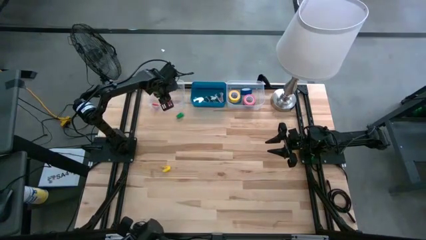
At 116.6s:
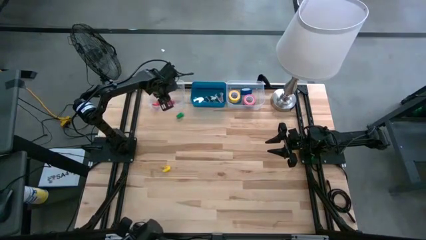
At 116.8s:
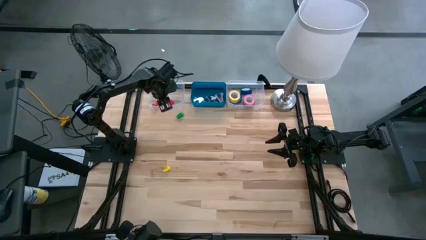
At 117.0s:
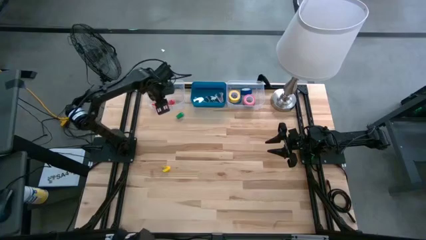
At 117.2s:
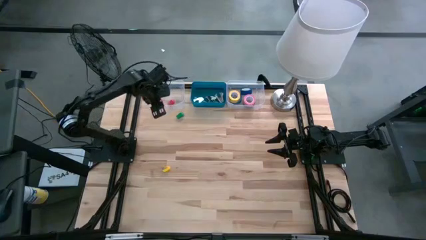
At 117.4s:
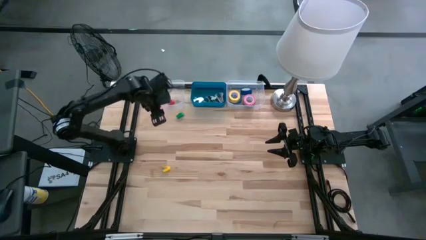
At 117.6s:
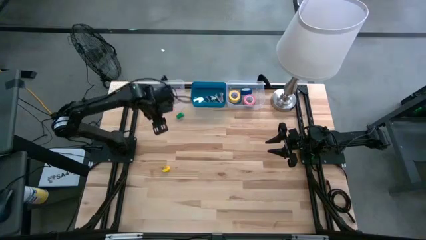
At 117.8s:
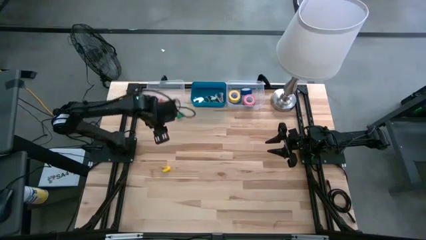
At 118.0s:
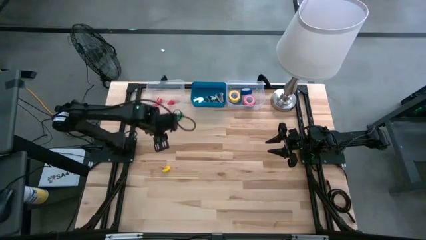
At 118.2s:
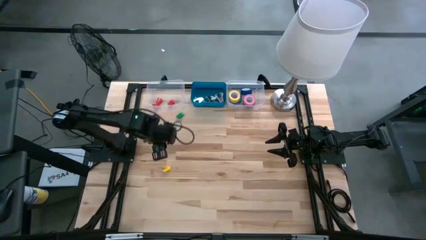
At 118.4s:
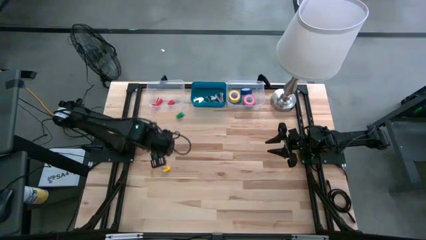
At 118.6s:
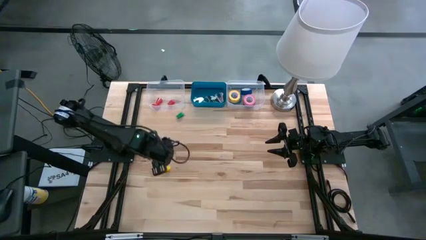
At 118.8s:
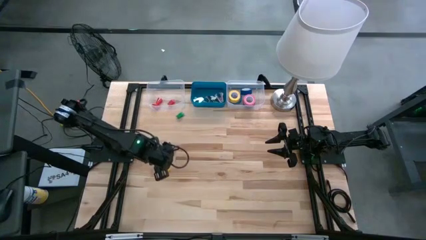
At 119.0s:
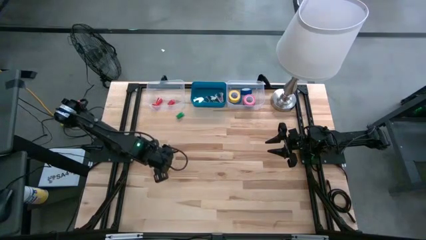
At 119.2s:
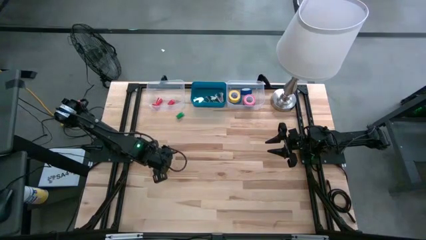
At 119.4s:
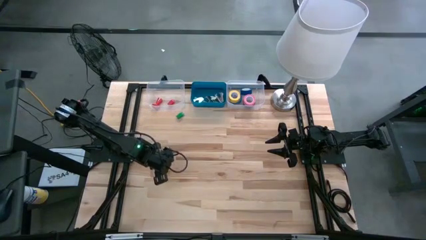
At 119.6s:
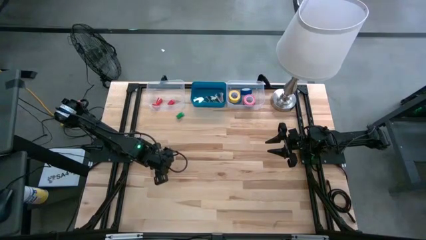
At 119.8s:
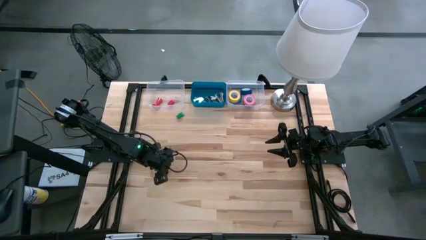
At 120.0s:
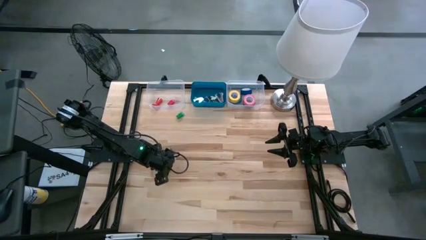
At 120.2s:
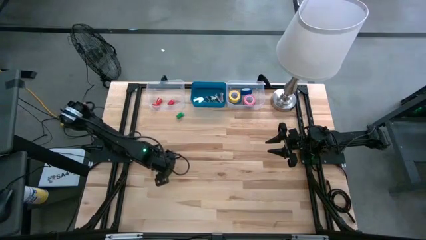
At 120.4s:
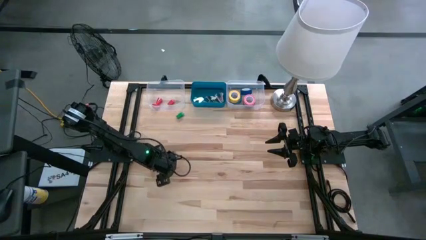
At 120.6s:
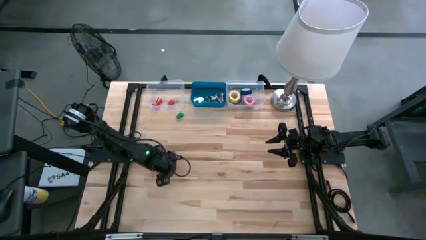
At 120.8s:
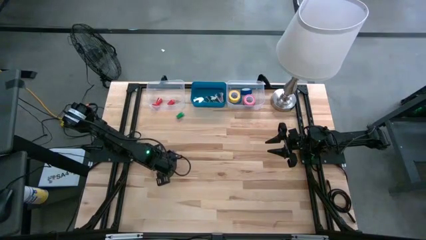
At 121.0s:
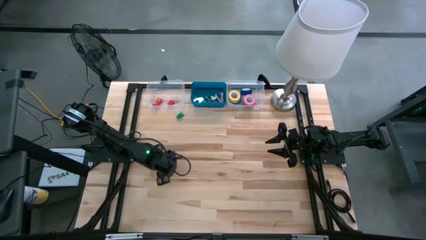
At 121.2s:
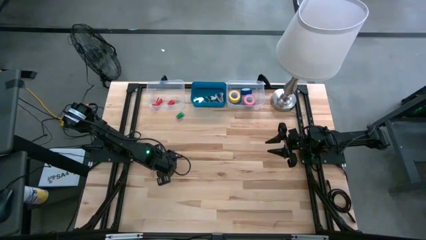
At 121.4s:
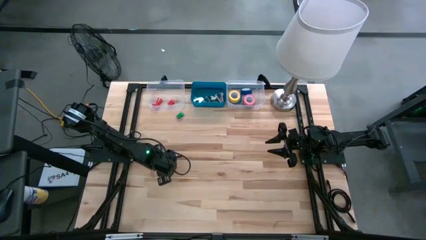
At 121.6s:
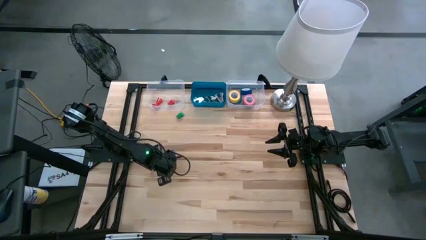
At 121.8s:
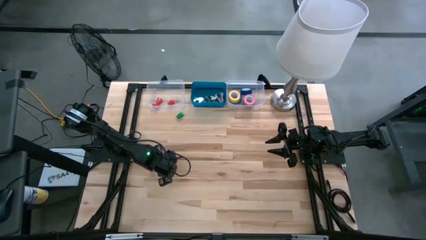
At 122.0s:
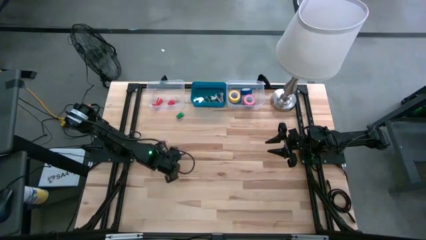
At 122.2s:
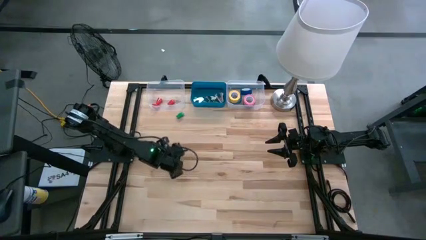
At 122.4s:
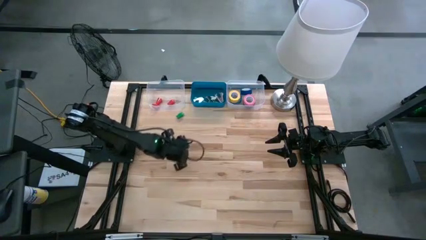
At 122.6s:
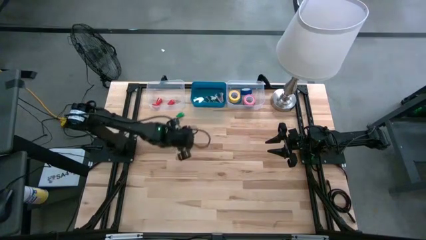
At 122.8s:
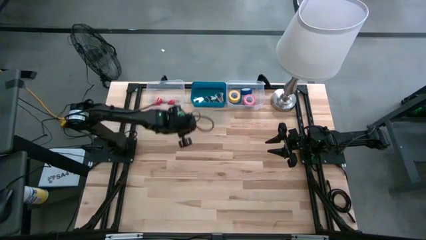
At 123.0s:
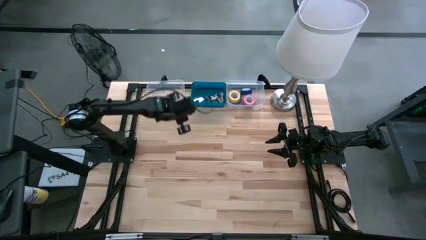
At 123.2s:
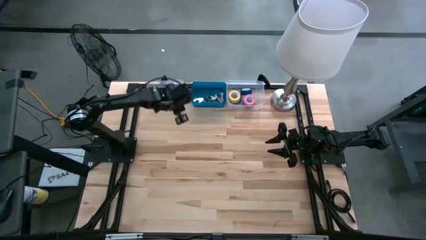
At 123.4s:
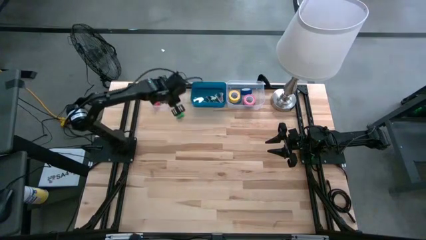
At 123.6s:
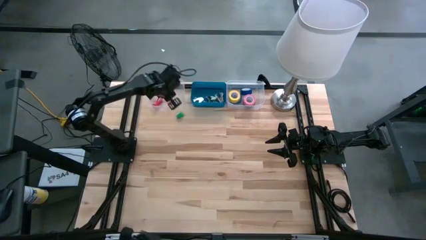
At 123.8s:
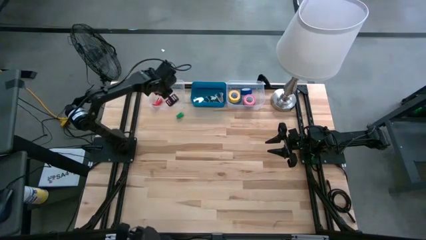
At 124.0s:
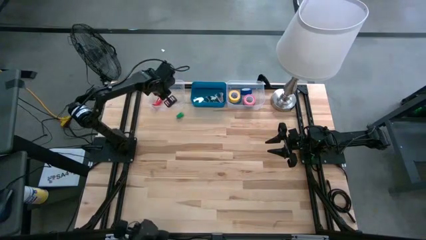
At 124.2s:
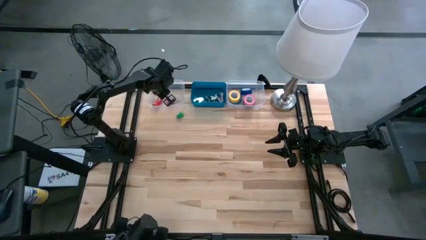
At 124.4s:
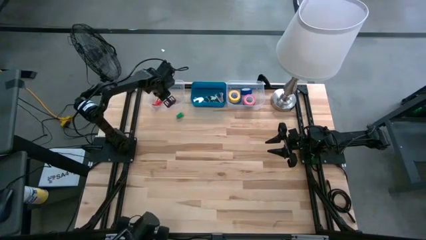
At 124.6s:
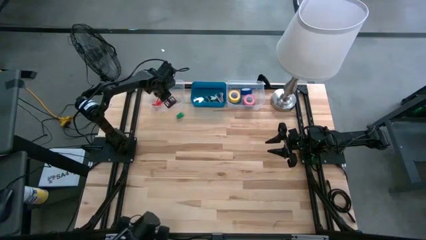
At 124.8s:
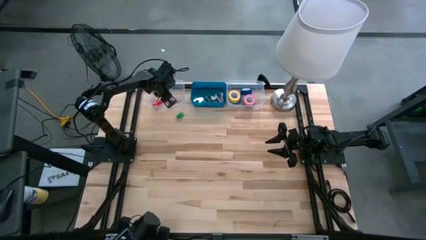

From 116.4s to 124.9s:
Task: Pick and place Stapler, Stapler remover, tape
Put the yellow stapler into the left transparent bin

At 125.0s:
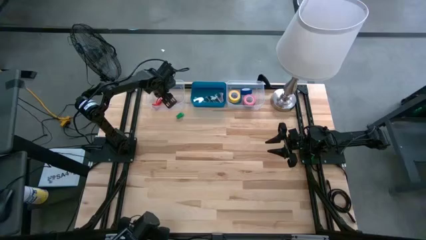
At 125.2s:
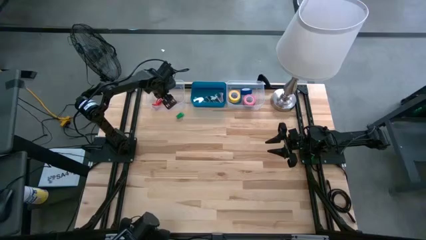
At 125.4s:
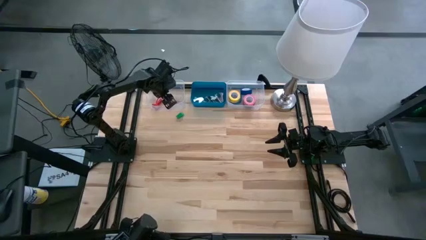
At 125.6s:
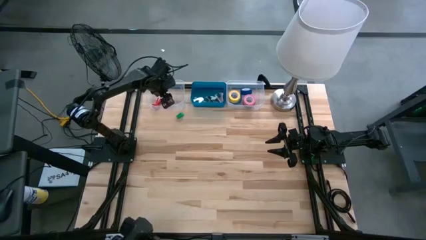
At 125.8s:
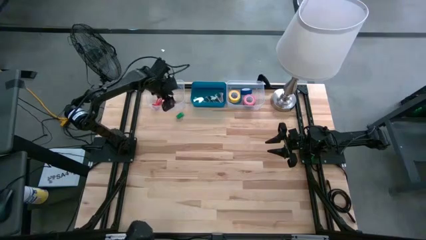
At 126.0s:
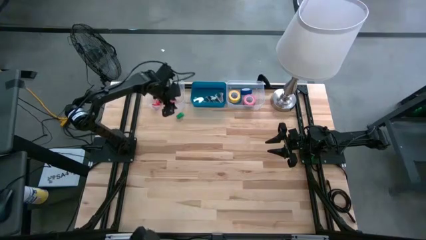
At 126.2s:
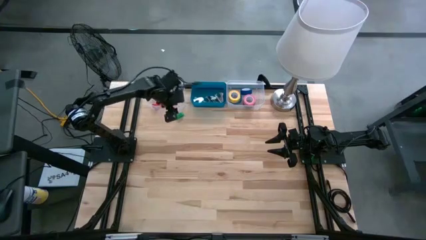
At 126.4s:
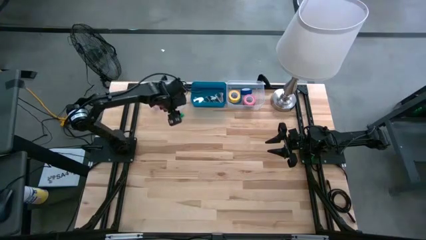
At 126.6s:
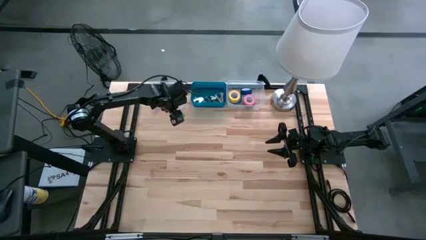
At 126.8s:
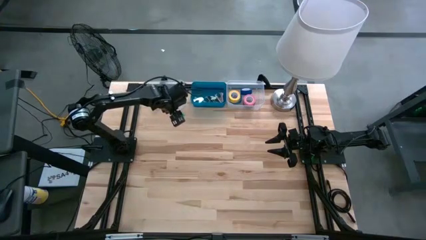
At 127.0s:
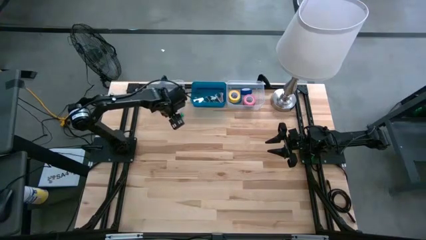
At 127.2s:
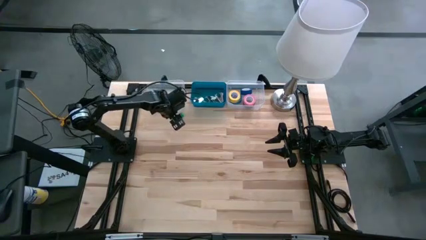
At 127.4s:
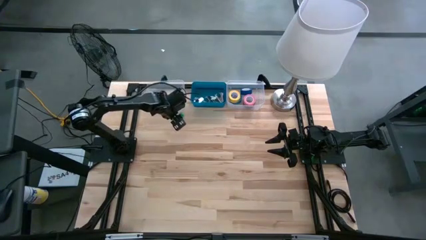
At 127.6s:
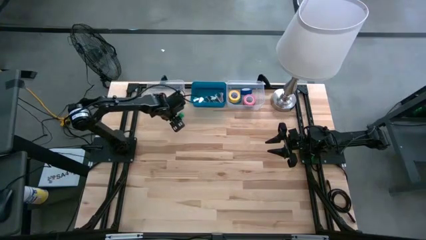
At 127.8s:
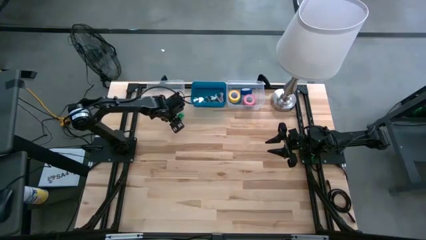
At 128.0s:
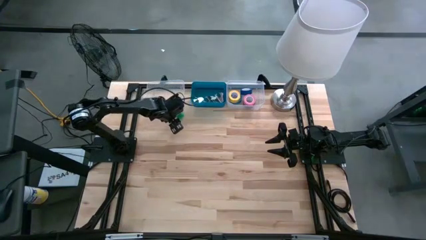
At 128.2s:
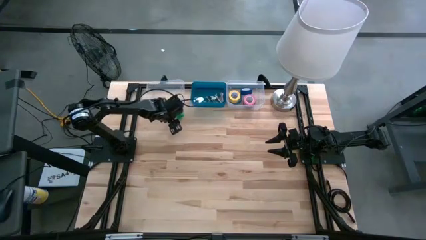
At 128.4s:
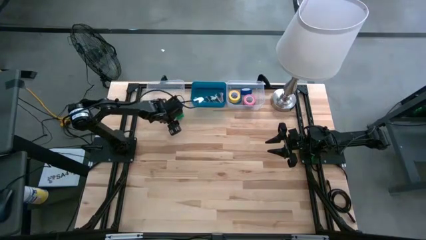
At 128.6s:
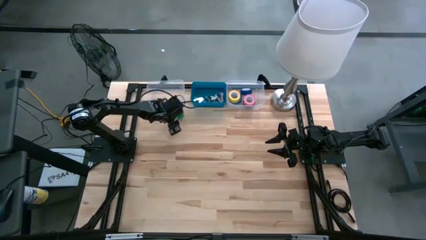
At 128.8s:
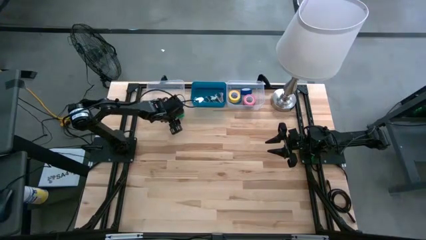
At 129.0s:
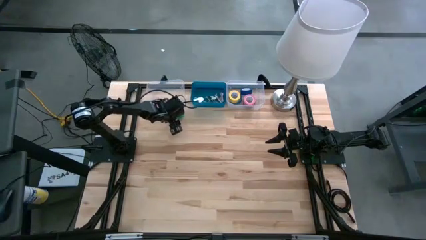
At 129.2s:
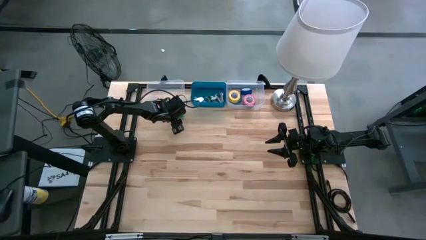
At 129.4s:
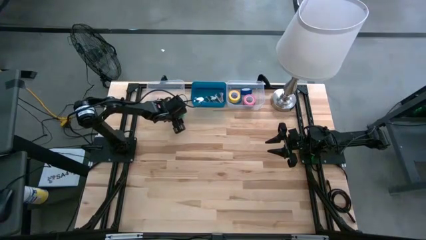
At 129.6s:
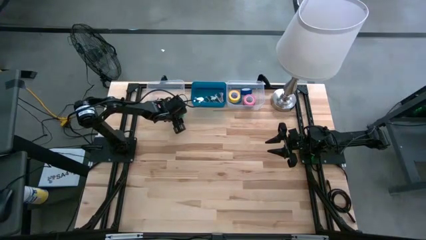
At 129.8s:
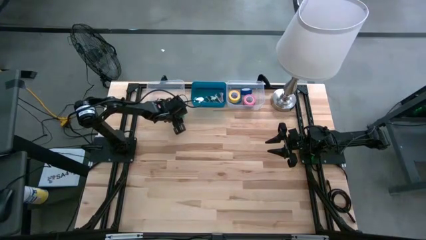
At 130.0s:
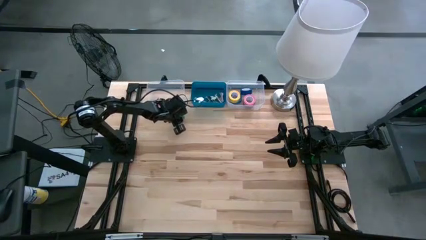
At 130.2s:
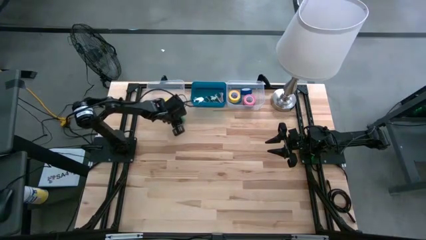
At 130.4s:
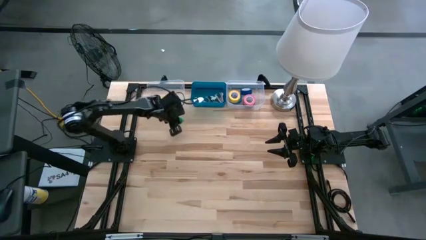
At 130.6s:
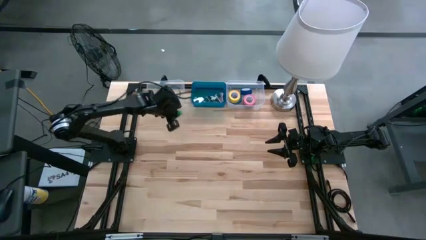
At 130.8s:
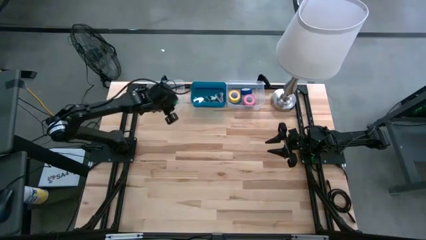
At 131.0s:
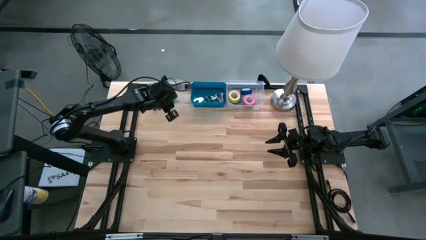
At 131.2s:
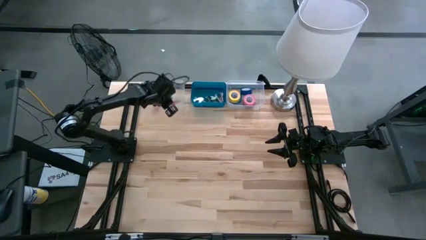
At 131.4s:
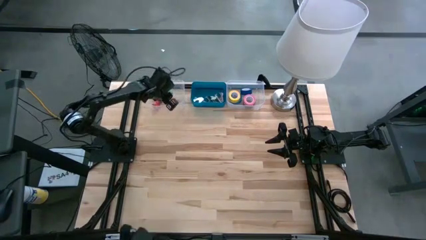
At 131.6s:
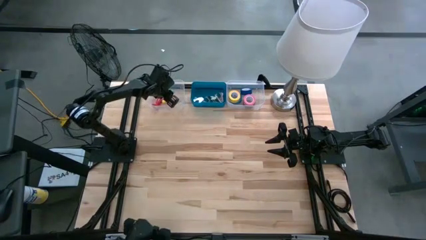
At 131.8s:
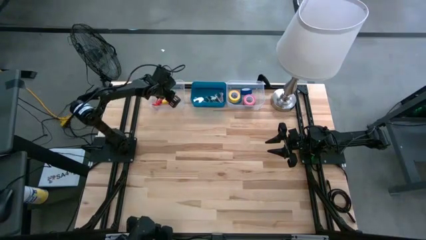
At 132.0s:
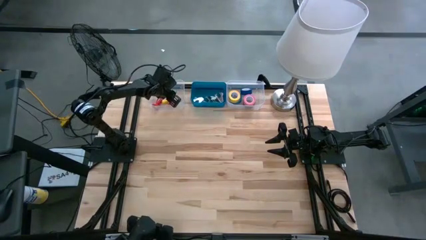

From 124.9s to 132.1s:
Put the green stapler into the left transparent bin

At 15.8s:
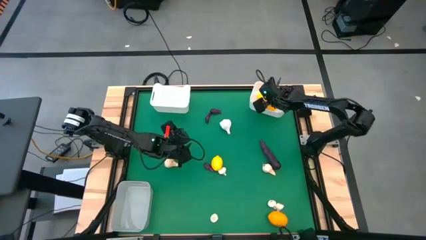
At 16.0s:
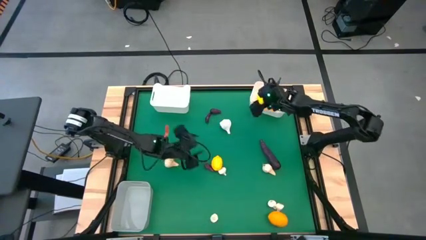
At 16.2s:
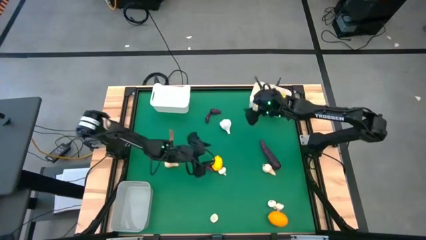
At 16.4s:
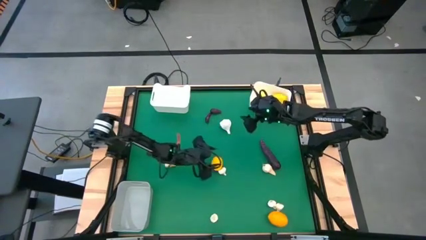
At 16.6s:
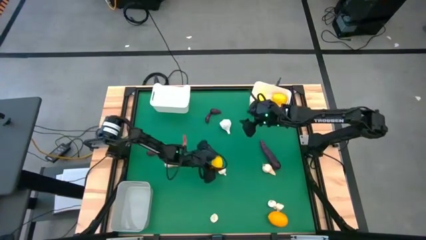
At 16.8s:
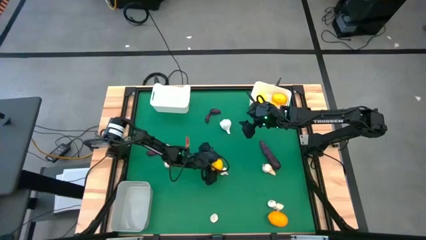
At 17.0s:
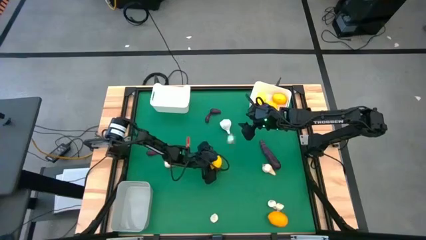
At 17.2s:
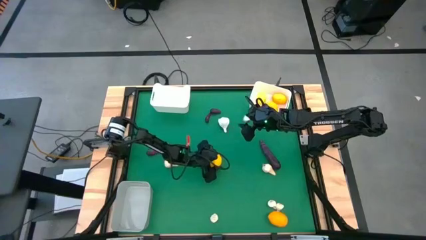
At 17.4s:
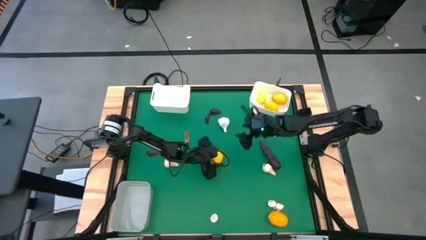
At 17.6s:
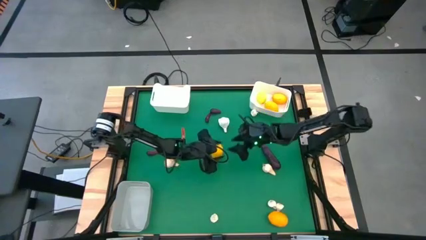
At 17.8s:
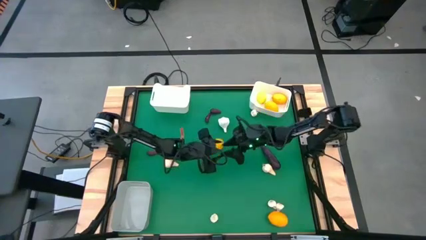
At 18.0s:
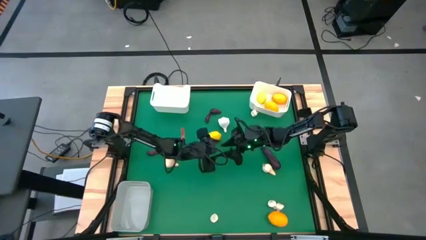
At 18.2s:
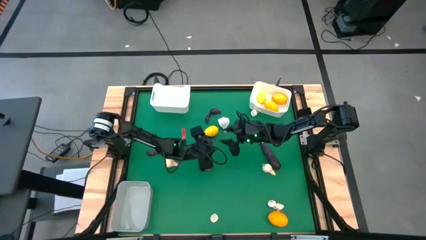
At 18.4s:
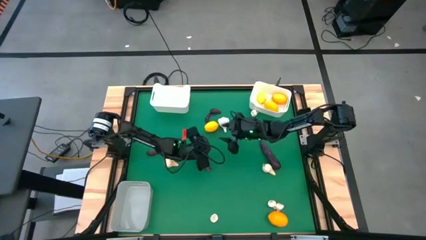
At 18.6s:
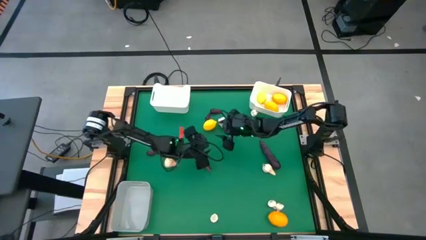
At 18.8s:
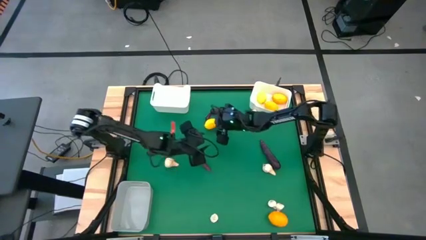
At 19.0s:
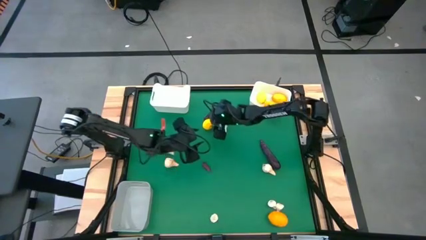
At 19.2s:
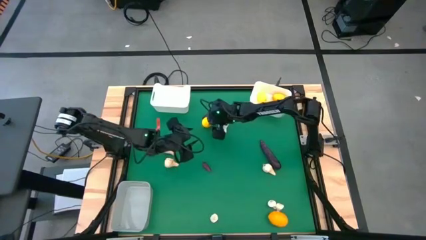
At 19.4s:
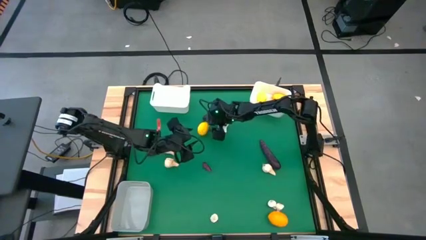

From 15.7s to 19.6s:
Task: Sort produce into baskets
Put the top yellow lemon into the white right bin
